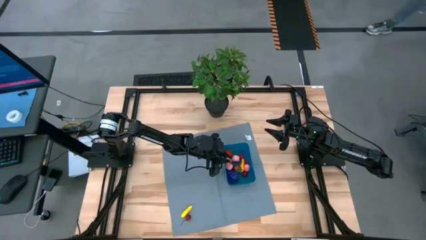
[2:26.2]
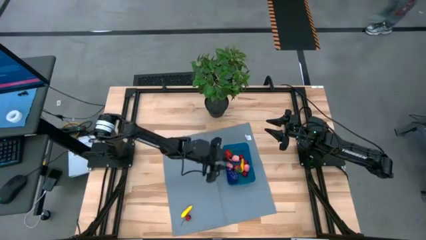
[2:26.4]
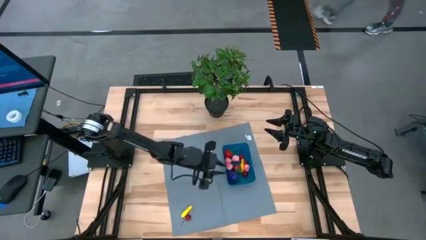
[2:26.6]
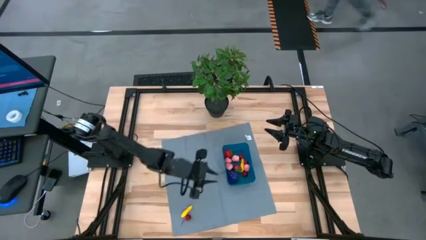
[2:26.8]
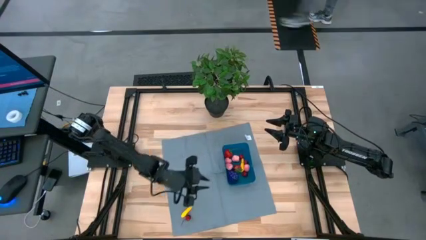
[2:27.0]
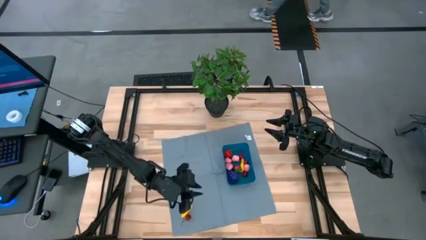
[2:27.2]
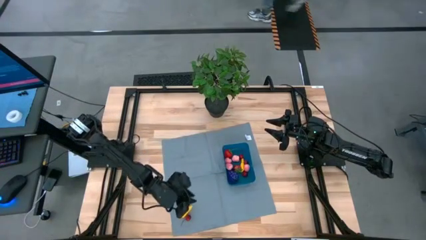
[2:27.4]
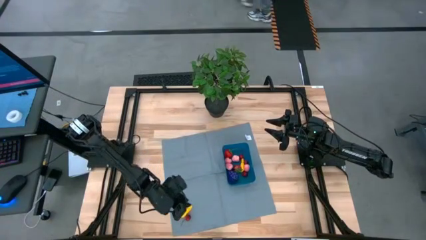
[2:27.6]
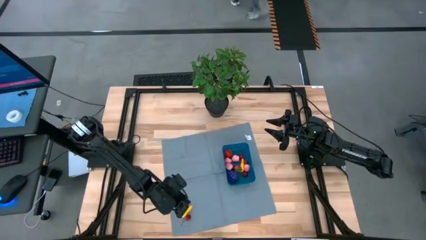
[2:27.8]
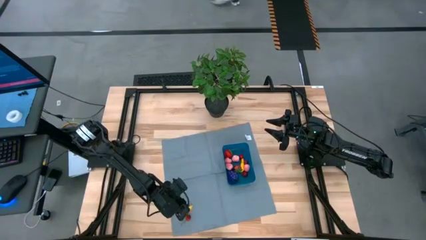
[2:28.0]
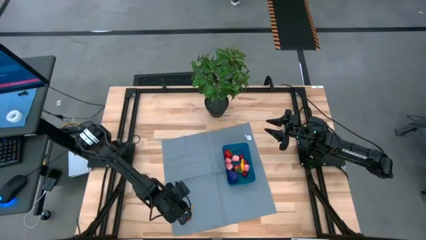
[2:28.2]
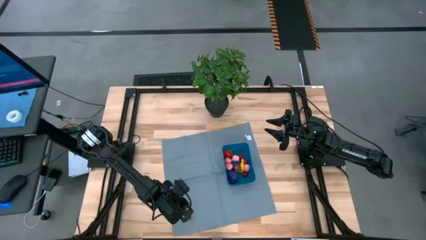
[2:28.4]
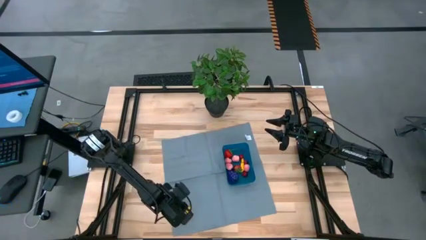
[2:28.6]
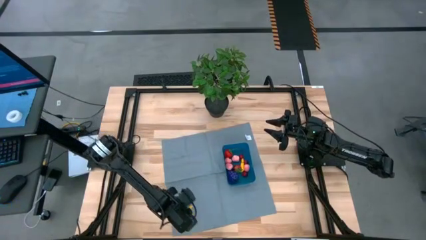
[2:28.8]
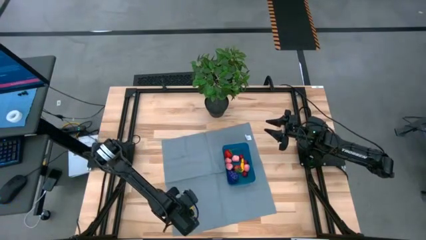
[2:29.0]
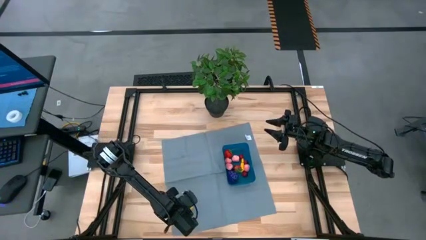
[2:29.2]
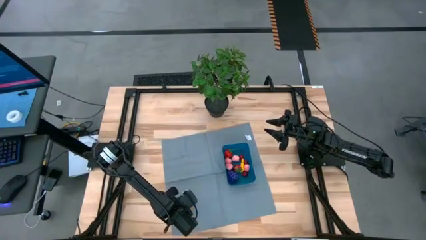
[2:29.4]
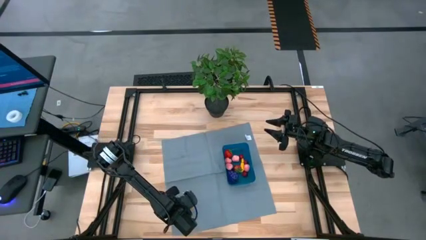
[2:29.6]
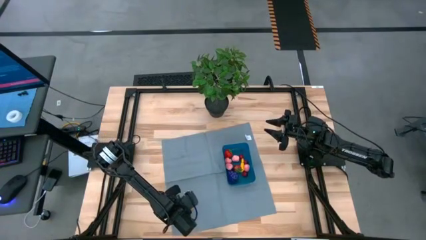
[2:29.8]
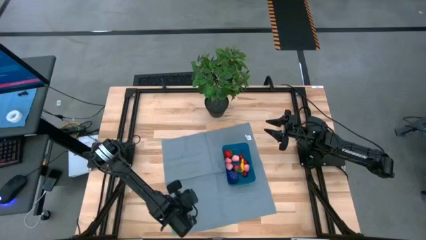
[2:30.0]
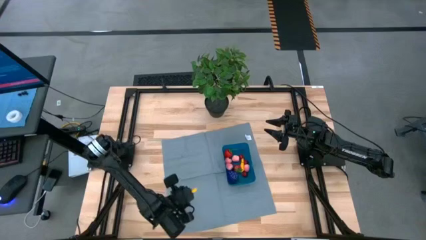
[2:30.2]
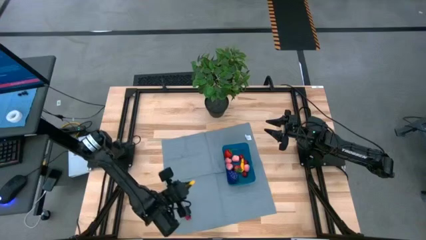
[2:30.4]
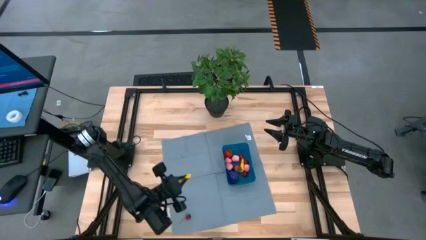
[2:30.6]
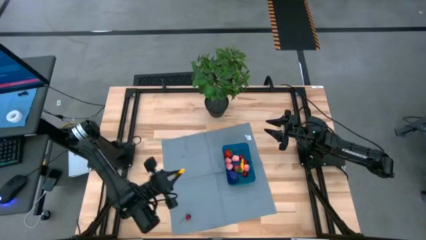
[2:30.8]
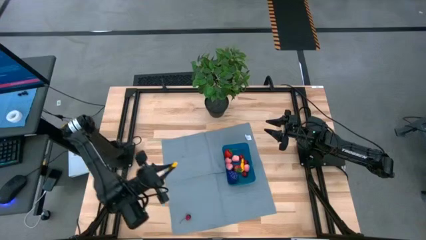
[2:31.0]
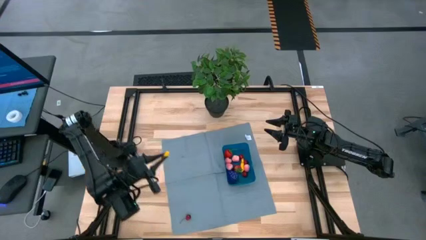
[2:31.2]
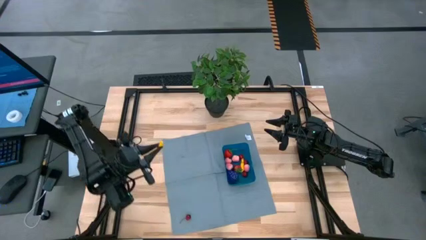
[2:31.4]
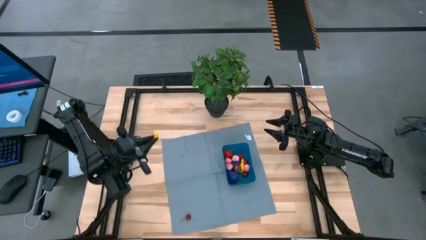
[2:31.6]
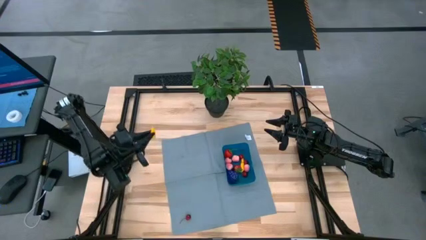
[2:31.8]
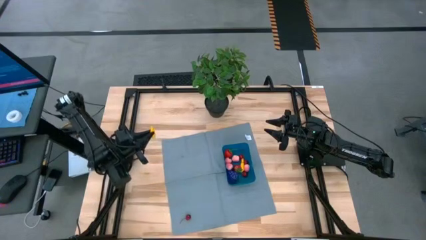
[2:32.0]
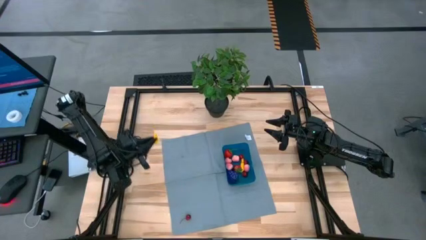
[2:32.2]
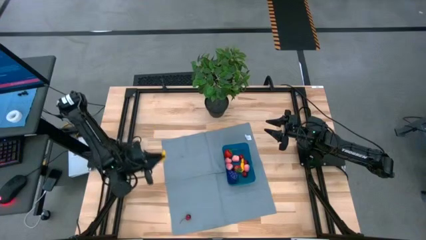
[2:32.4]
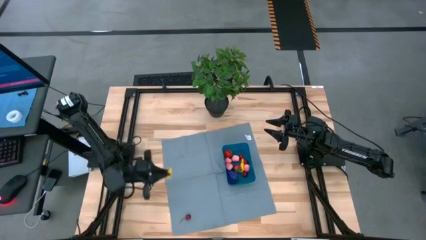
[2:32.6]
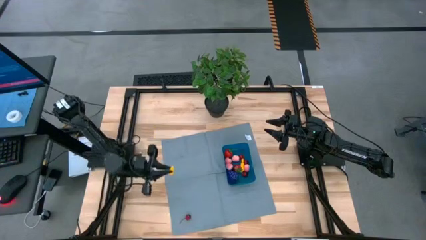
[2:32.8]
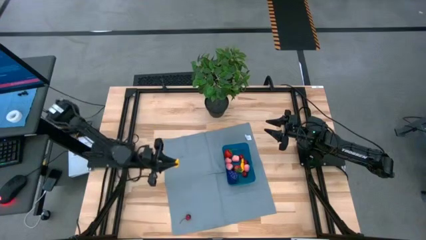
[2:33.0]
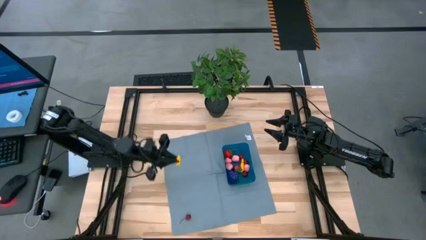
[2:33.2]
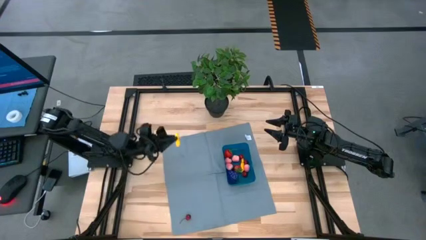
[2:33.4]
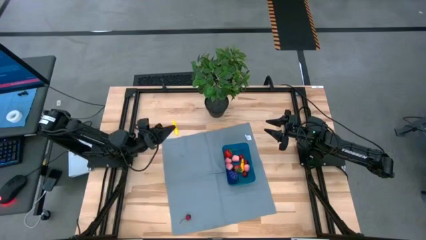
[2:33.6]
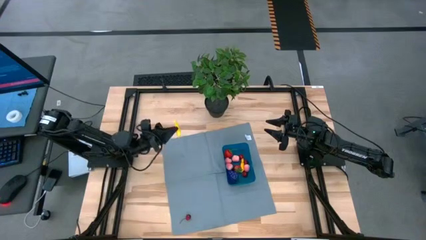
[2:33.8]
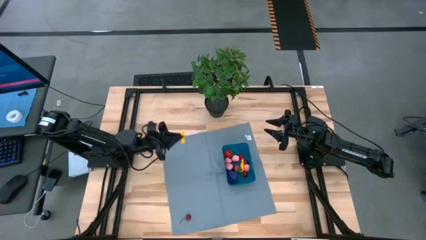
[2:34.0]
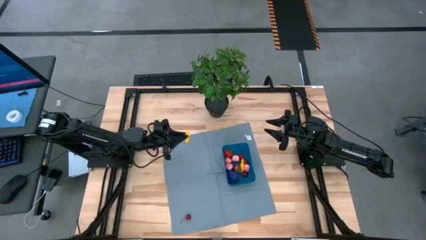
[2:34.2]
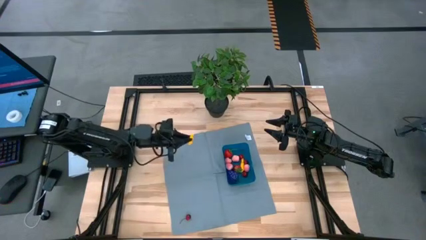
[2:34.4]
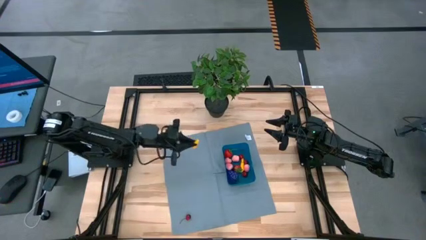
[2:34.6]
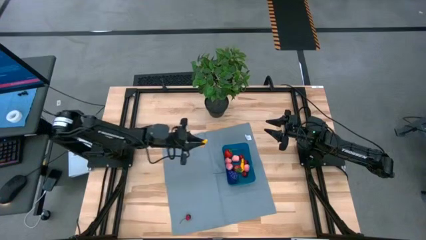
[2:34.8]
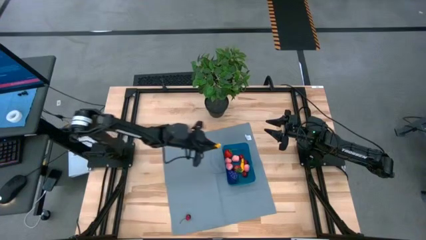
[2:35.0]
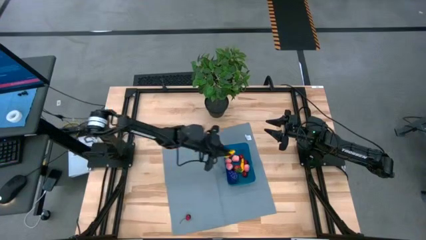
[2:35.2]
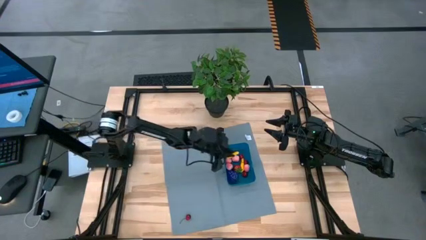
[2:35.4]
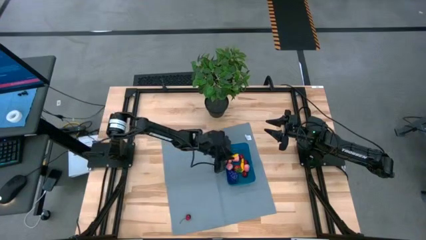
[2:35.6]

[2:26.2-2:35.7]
Task: Pick and placing Produce into tupperware
Put the corn into the bin

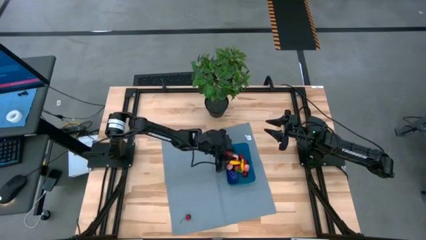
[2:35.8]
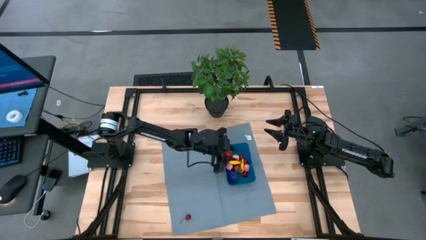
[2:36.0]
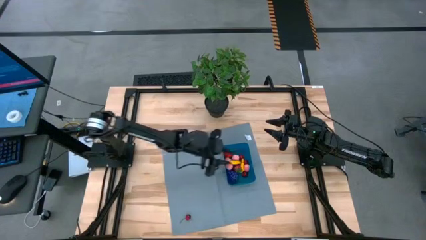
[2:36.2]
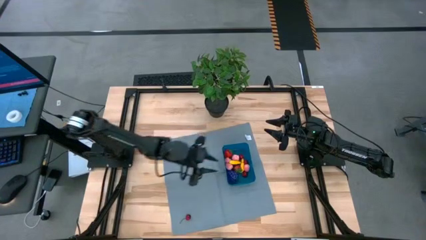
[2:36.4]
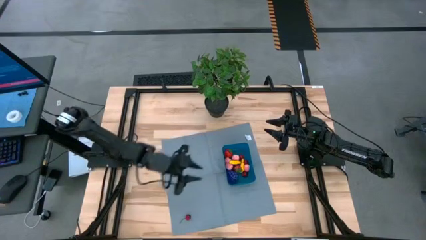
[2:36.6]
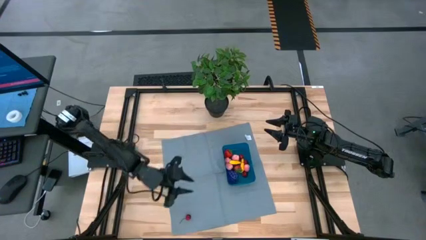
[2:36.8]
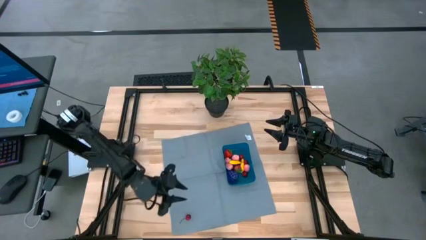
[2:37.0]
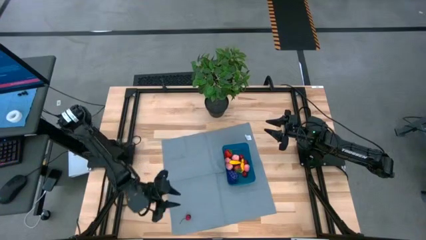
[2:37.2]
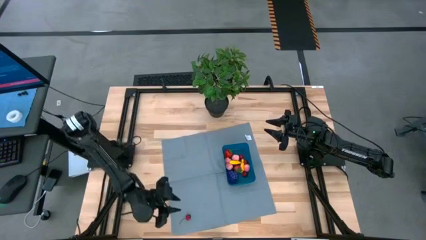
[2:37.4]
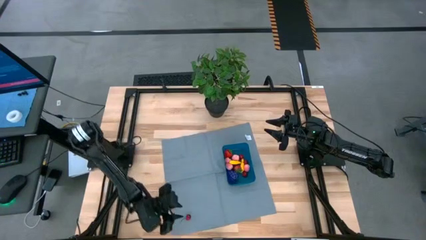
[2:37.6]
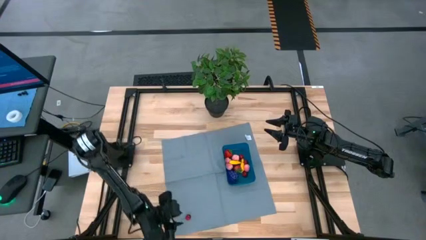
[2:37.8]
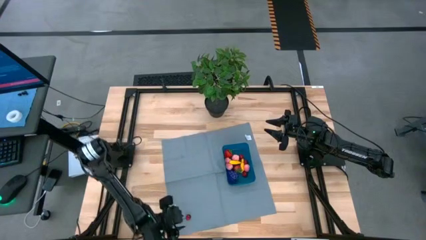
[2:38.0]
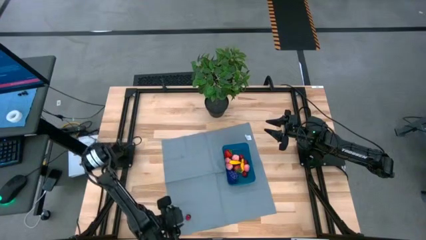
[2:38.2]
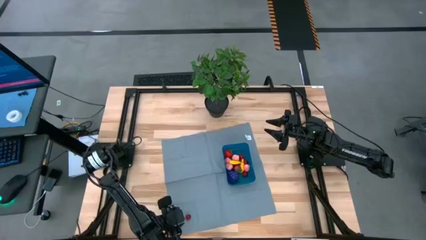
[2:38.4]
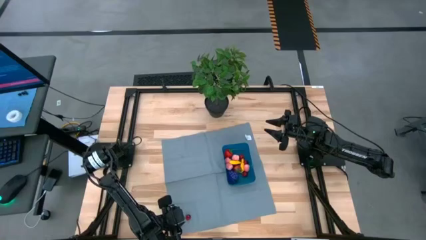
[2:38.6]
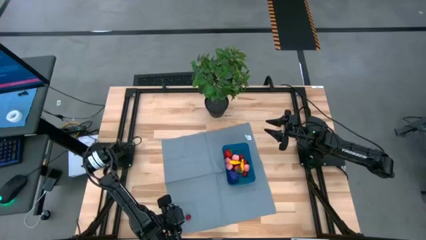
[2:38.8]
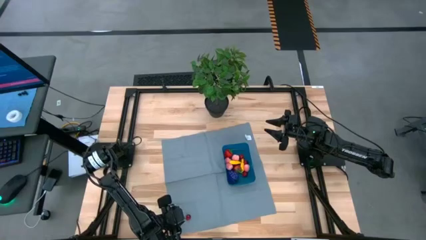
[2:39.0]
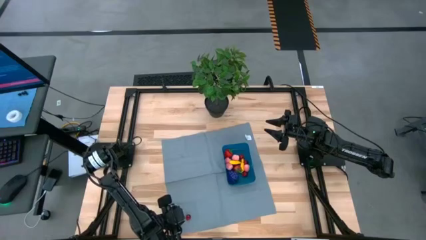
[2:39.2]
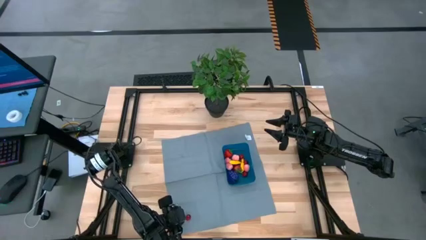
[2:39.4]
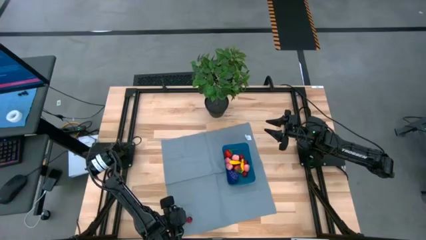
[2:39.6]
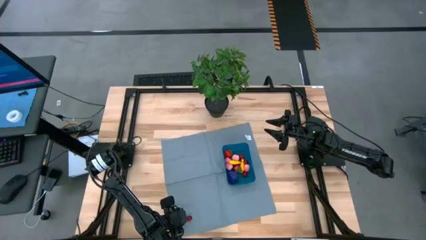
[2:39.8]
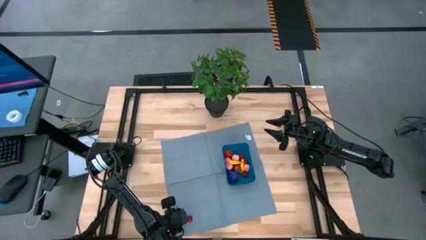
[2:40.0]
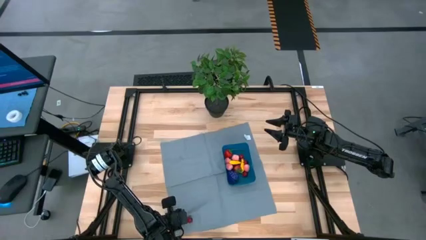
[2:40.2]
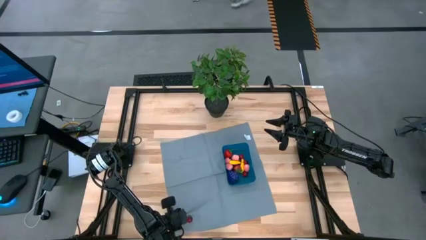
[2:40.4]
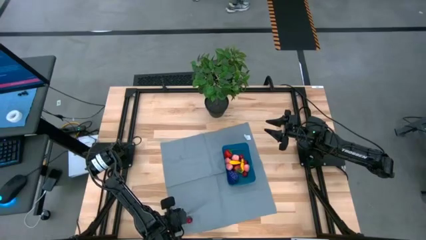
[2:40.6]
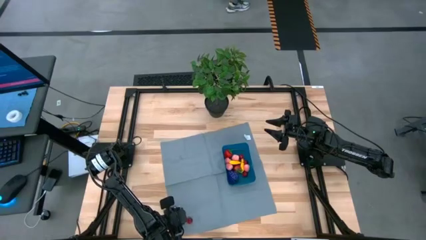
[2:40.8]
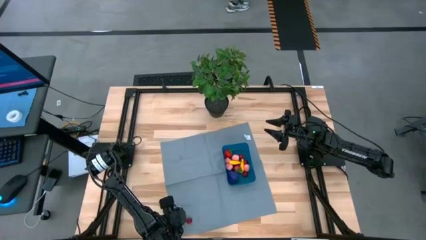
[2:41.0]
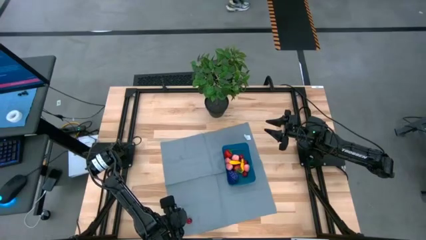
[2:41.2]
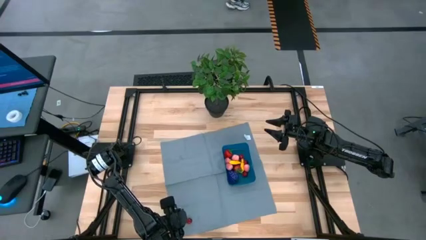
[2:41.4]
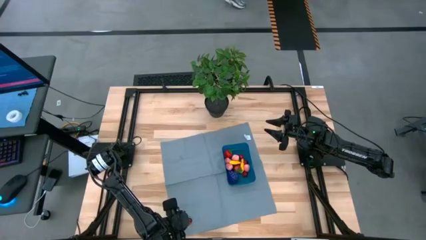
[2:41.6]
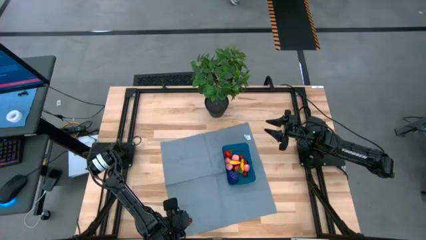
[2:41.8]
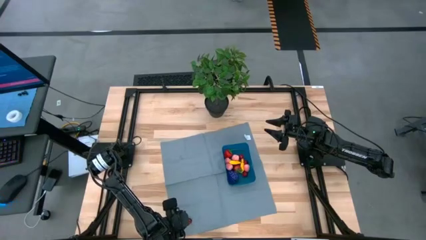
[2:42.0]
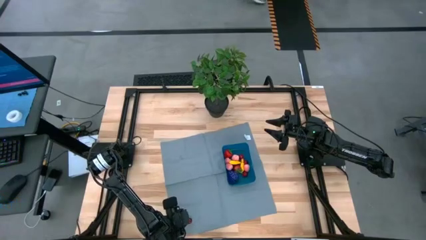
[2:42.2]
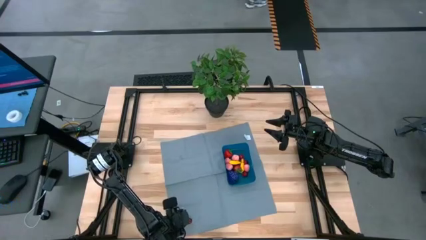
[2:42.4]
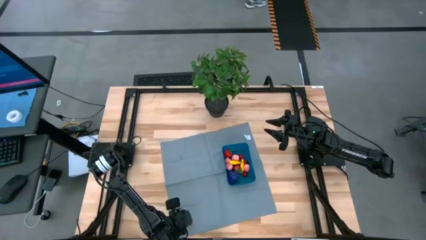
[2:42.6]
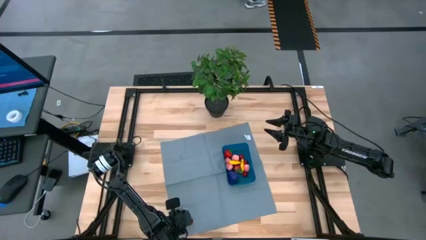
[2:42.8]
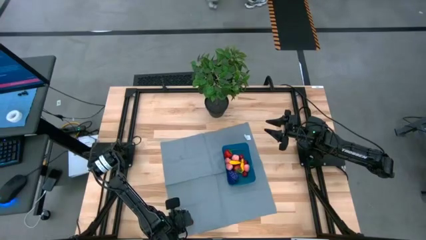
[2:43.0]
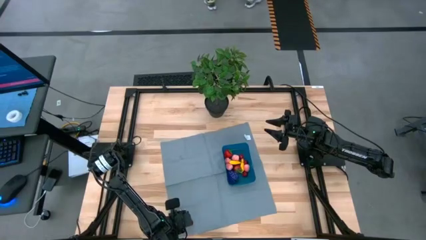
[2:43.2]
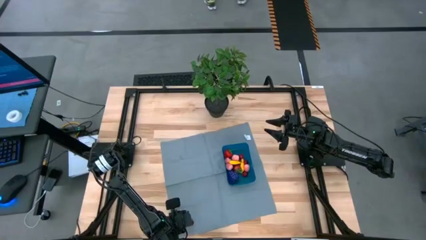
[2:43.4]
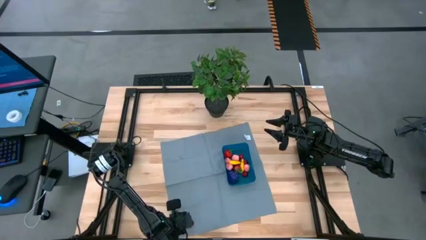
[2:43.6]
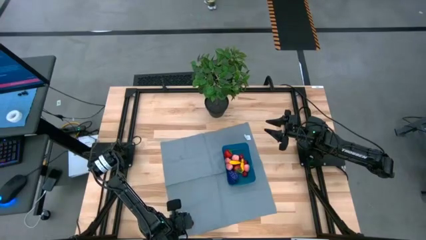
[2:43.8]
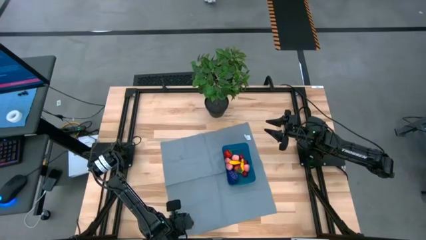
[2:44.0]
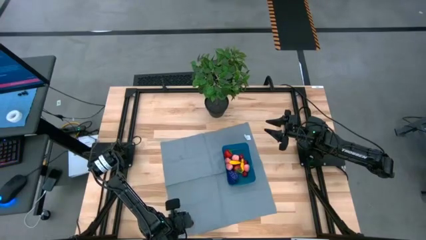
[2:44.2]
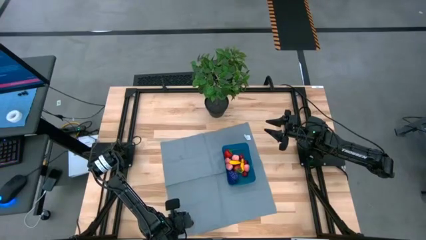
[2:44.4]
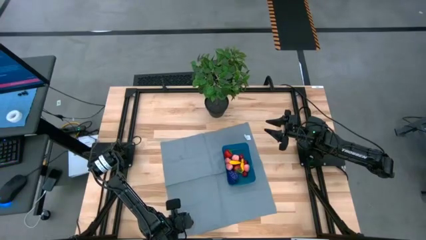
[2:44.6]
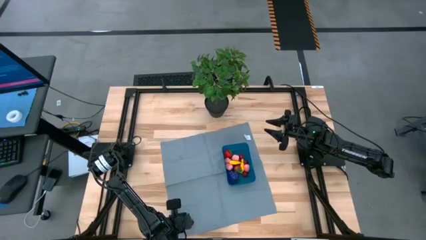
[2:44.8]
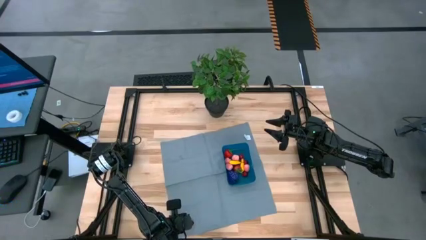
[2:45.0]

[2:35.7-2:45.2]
Put the red cherry into the bin
